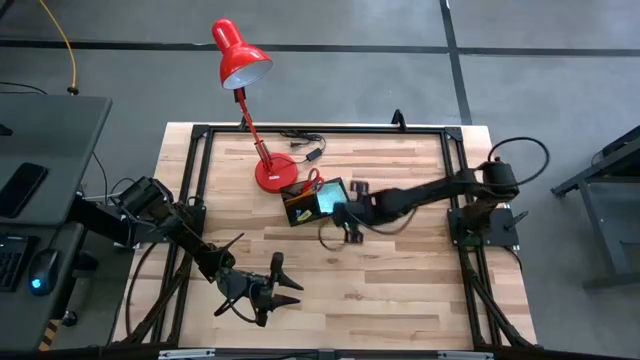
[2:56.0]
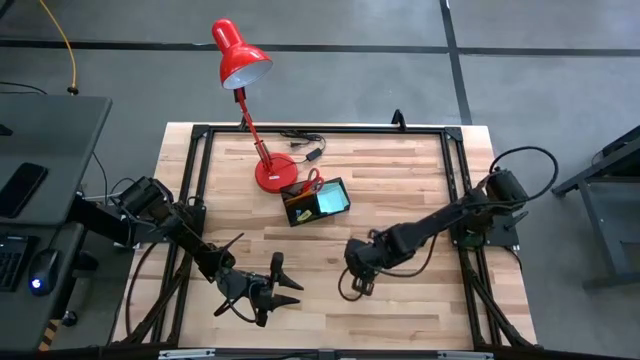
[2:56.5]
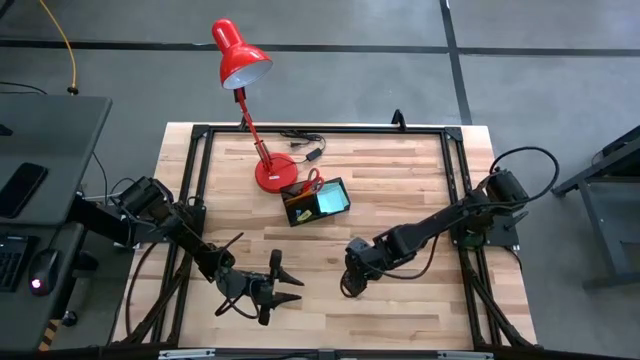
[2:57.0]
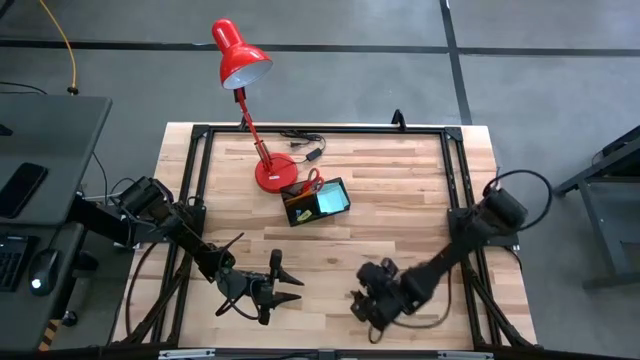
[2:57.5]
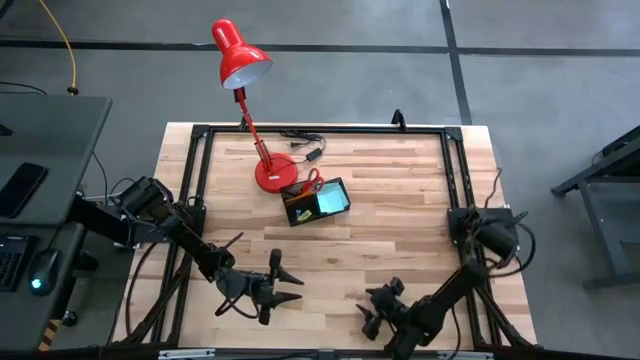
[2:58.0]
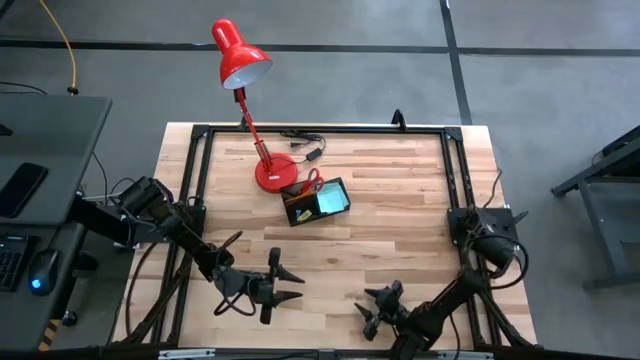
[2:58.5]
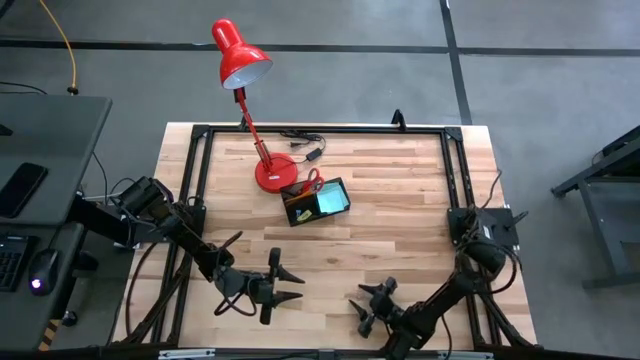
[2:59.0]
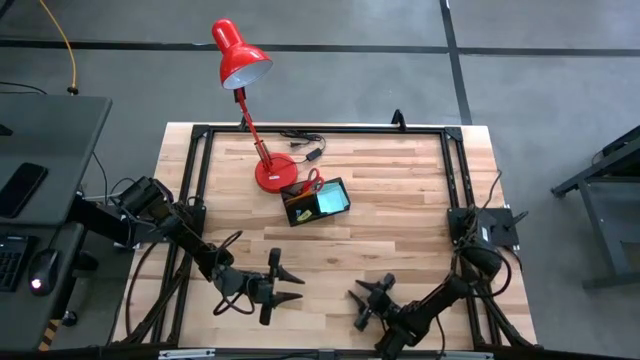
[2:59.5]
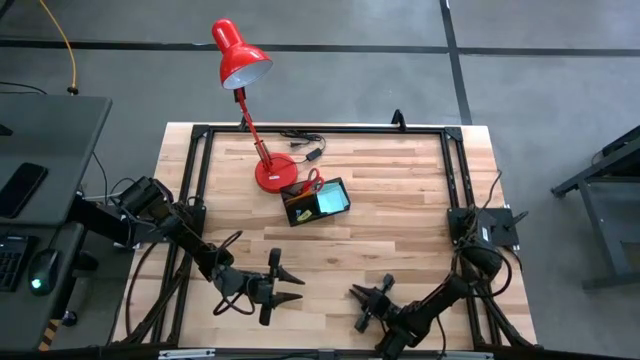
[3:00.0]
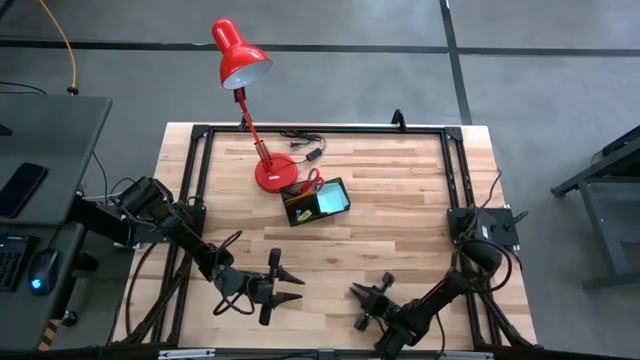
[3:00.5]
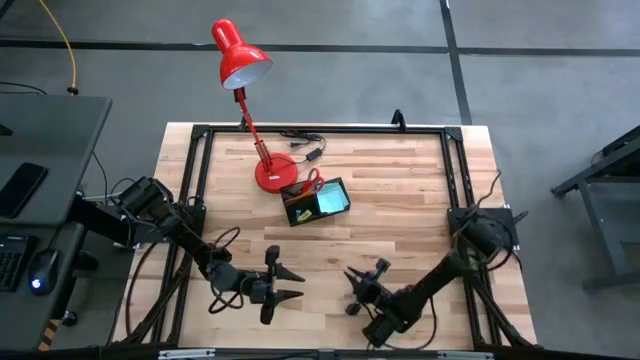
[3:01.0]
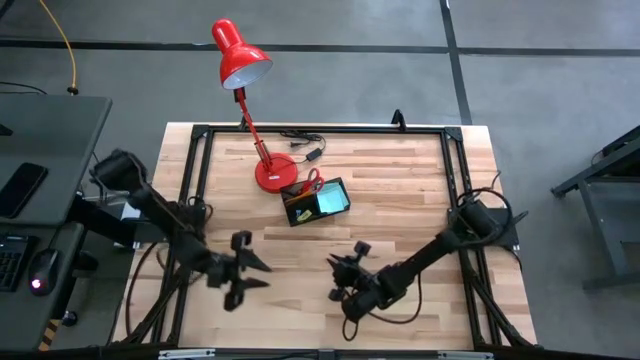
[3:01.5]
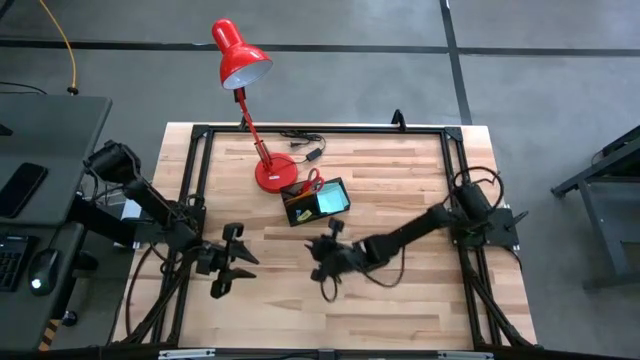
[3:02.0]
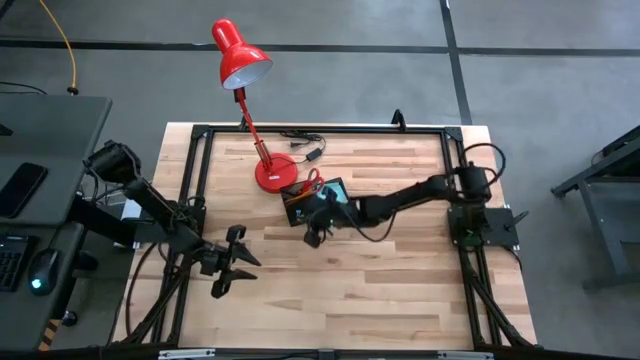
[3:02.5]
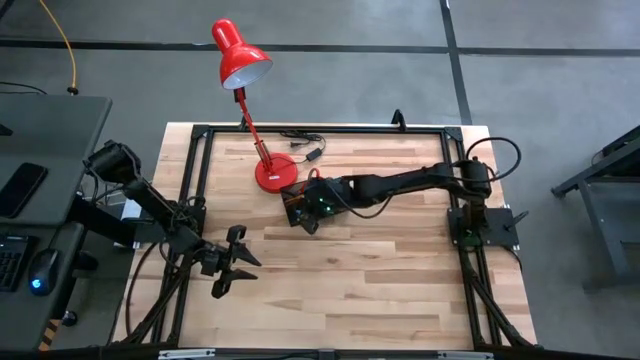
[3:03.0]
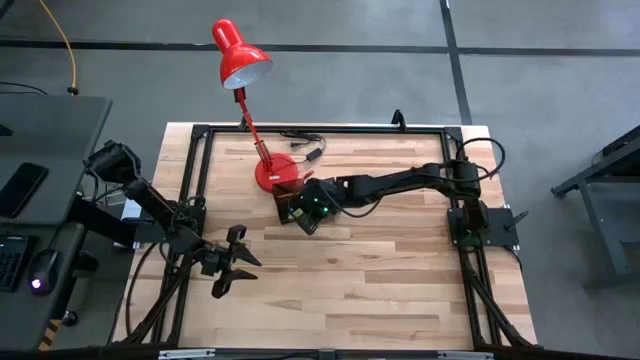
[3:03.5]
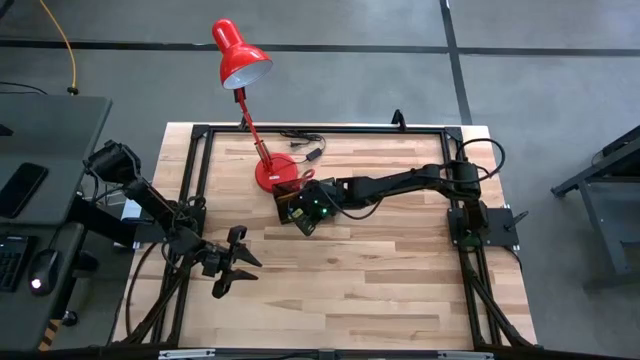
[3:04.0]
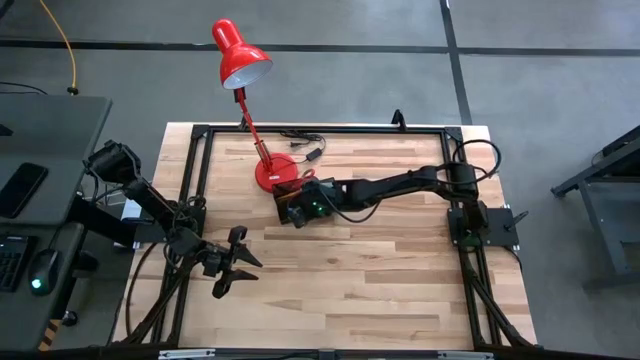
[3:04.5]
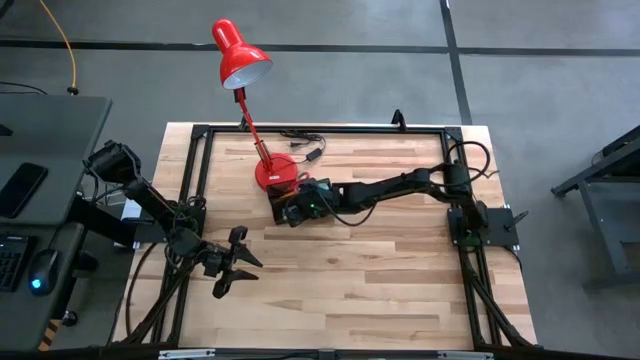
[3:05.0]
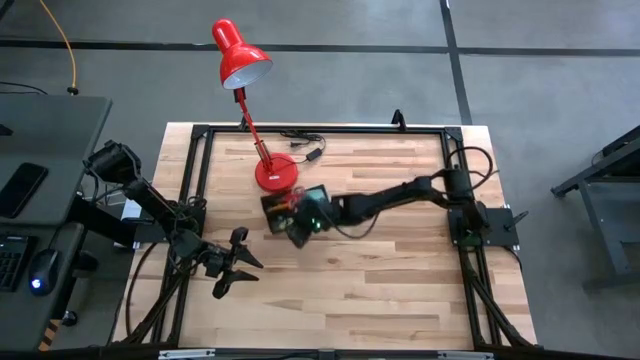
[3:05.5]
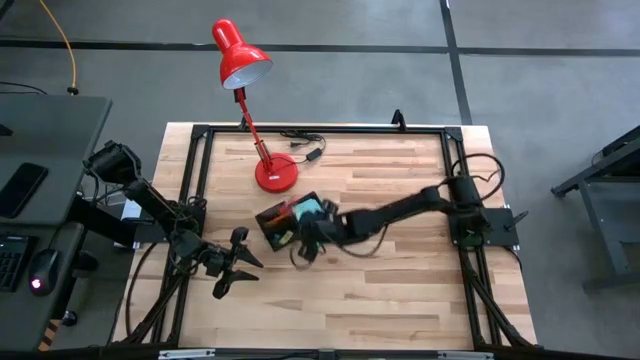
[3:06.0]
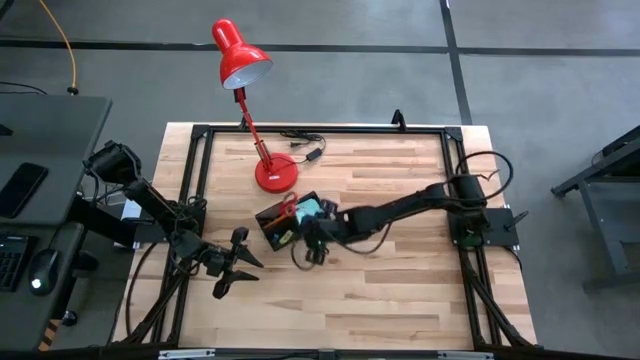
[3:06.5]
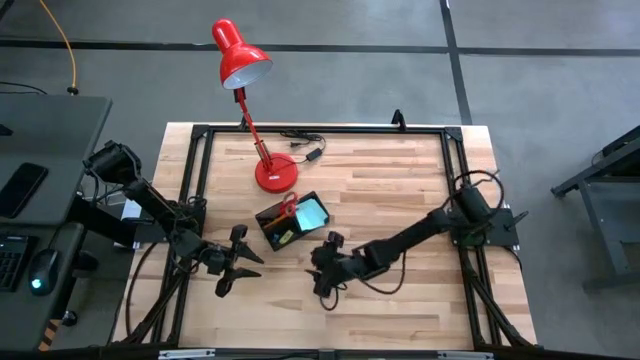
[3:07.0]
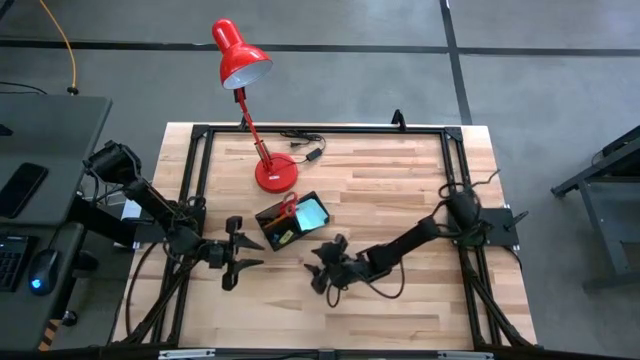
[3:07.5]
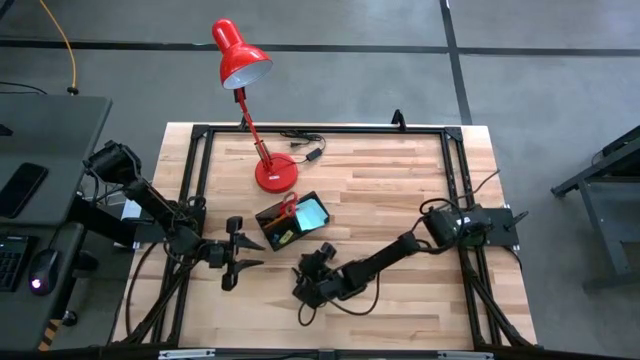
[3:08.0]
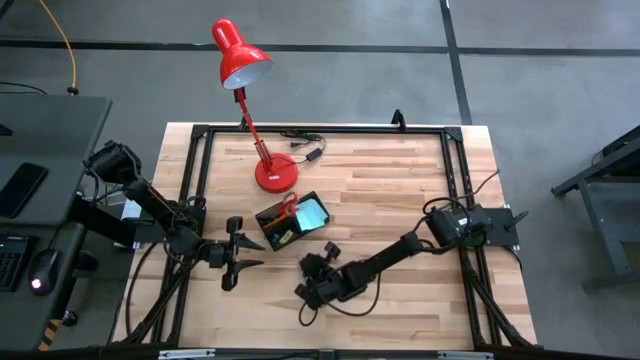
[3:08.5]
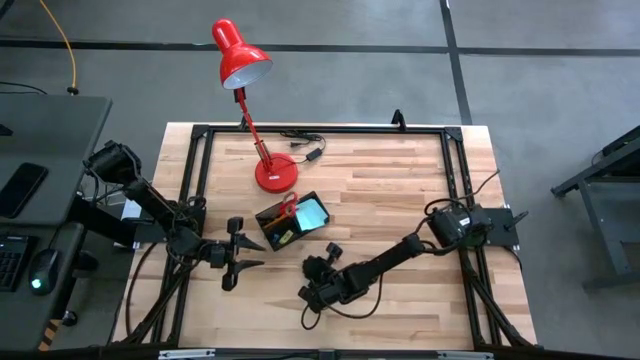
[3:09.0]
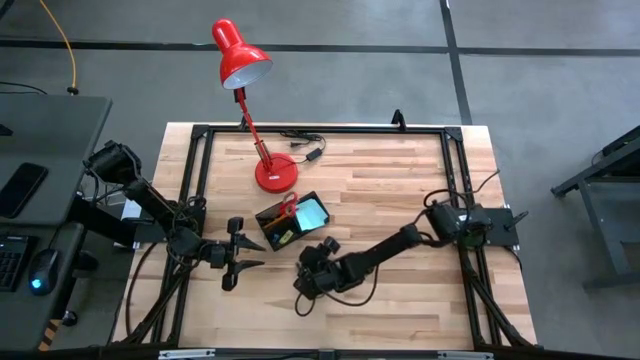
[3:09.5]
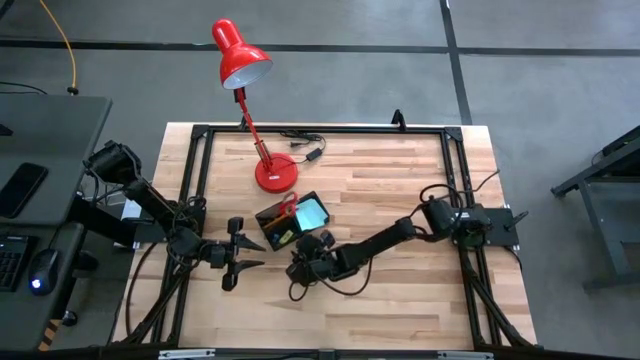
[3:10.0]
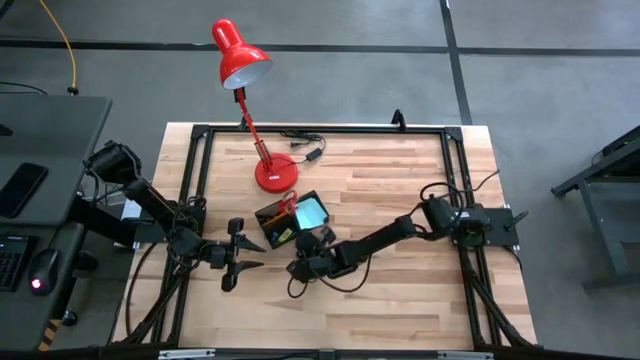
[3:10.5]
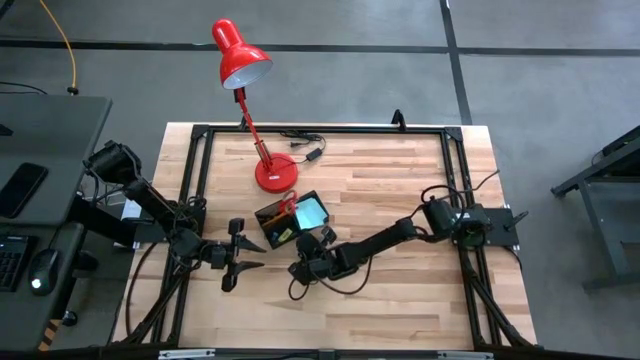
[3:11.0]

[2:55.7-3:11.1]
Task: Pick and place office supplies into organizer
Put the pink binder clip into the desk organizer

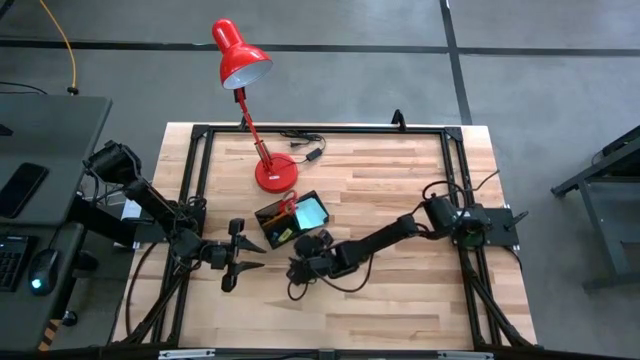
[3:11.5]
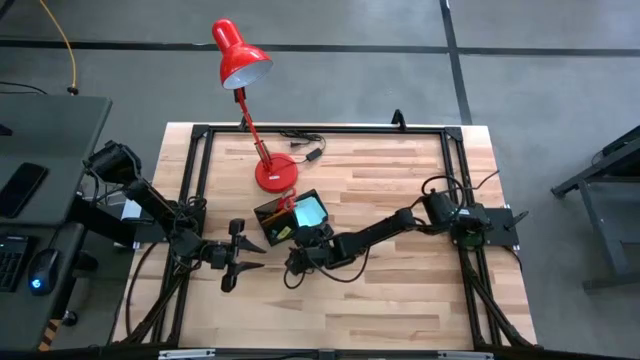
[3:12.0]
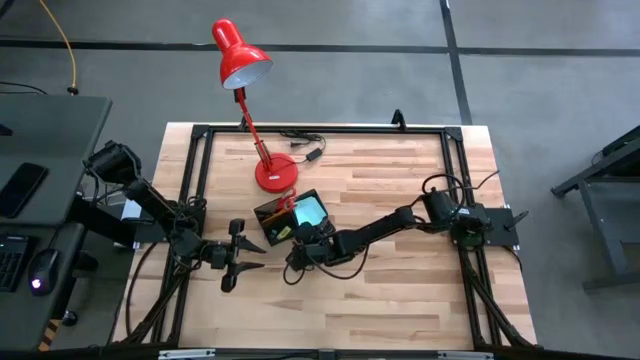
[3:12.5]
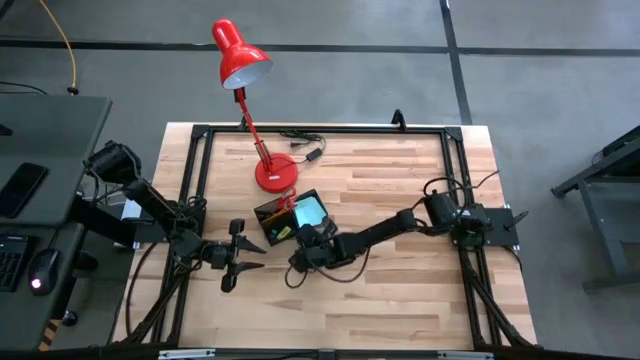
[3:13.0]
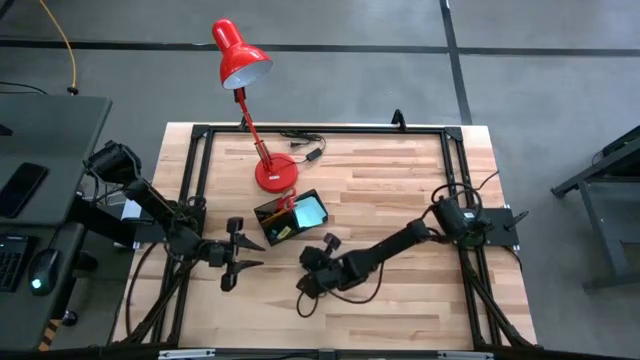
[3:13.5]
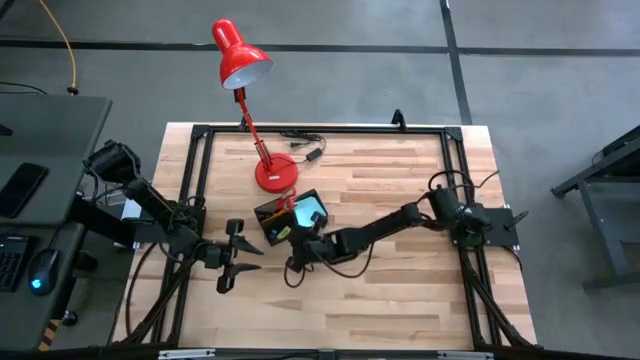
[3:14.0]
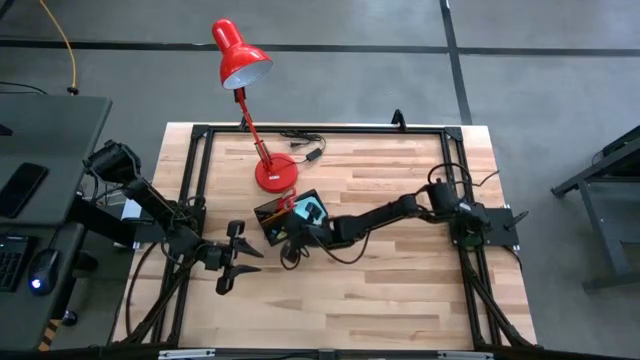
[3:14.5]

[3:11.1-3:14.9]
Put the pink binder clip into the desk organizer
